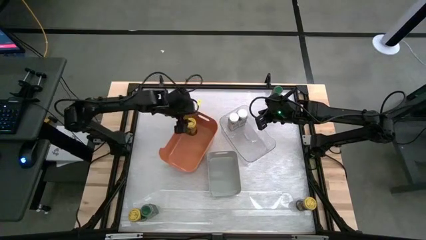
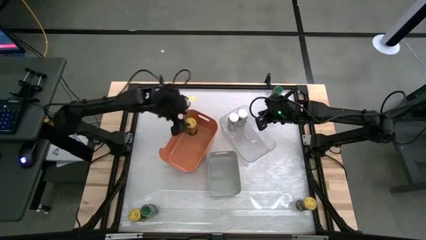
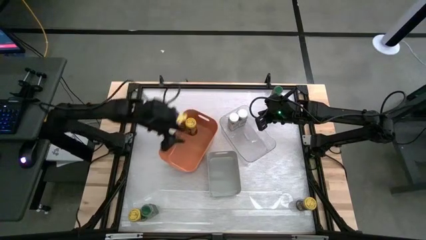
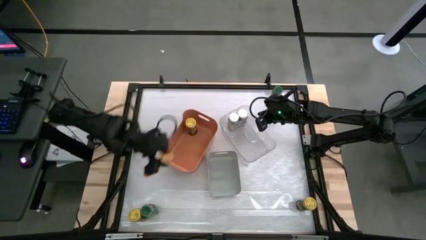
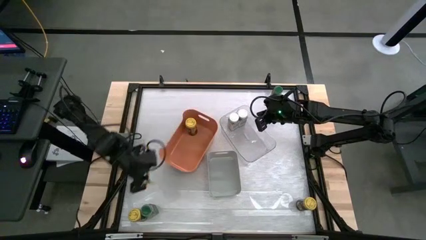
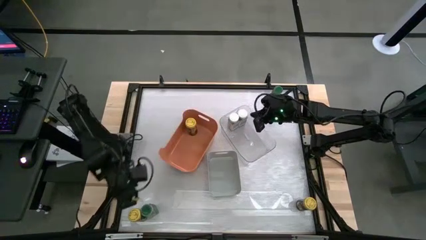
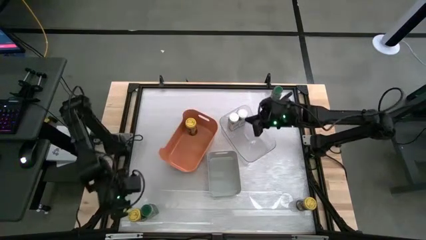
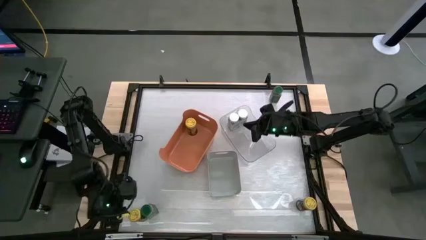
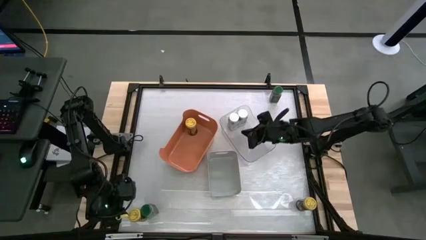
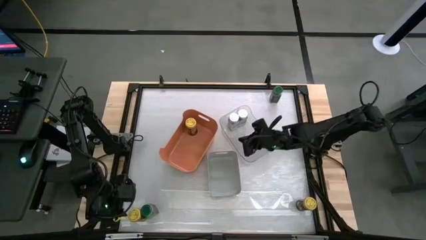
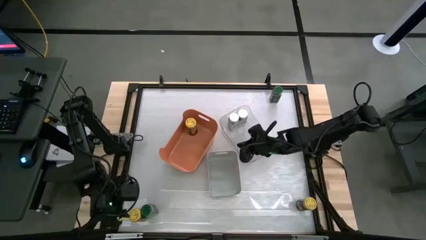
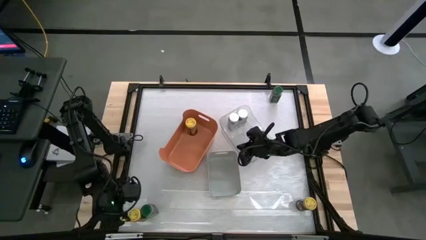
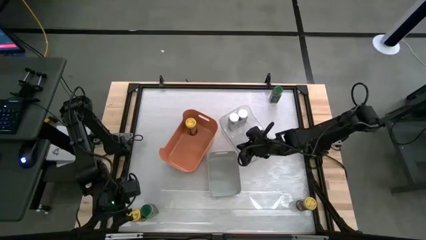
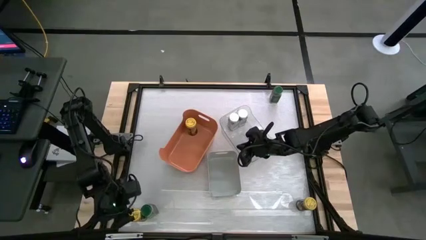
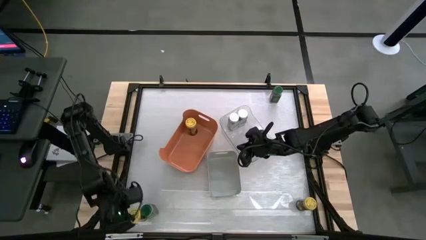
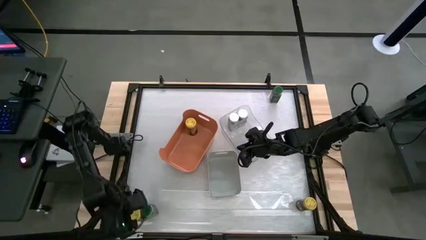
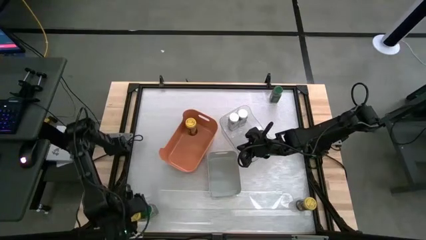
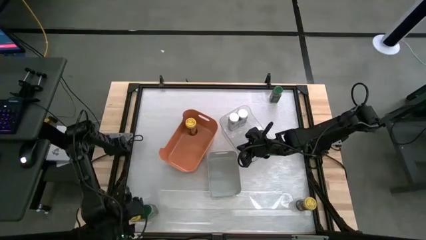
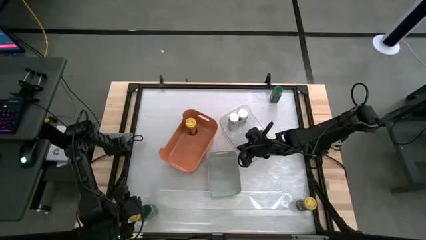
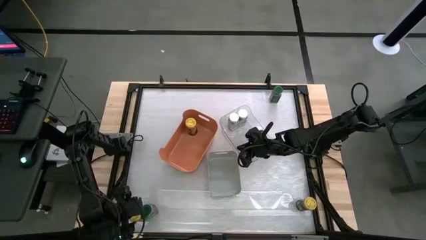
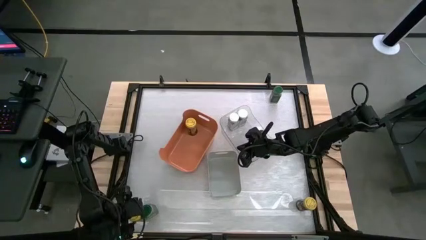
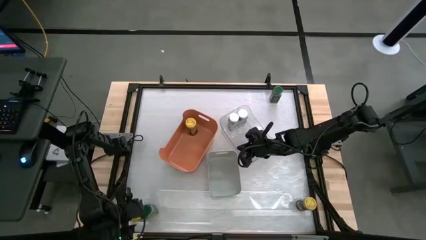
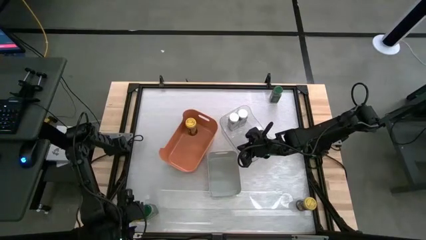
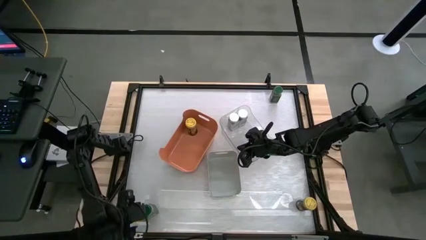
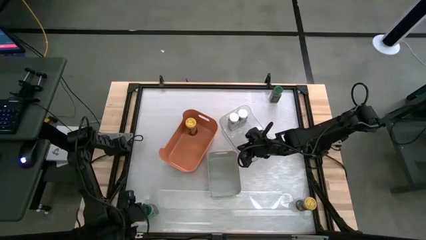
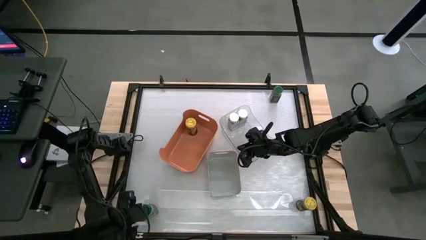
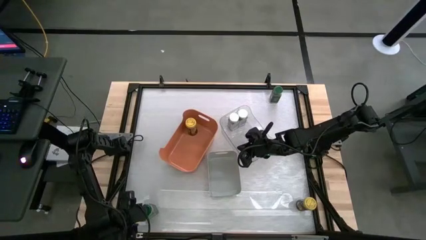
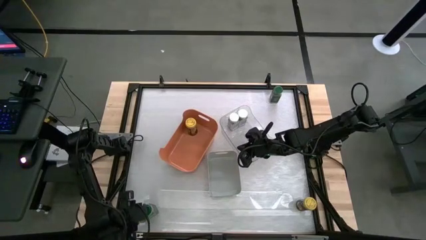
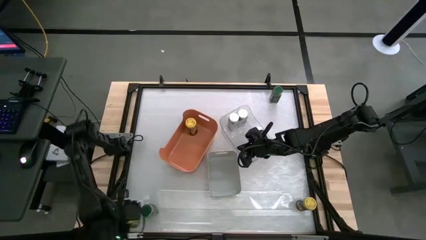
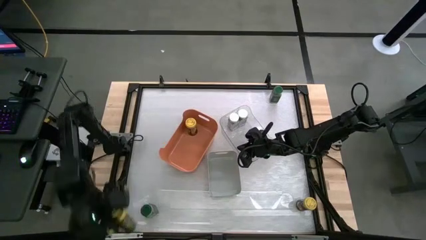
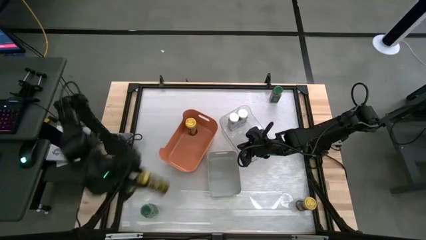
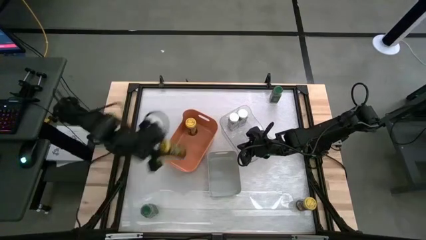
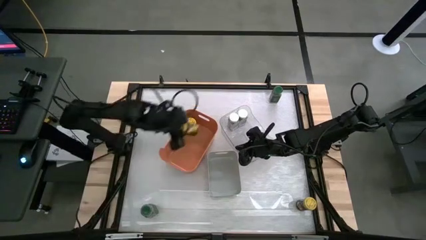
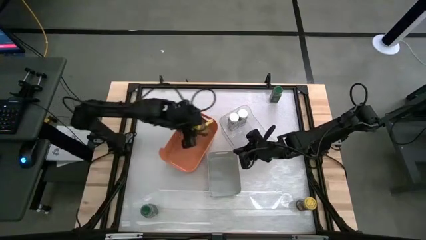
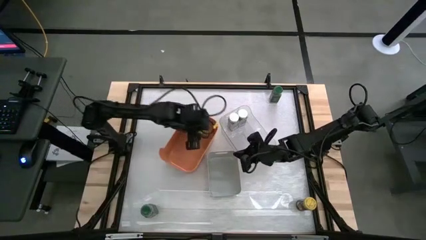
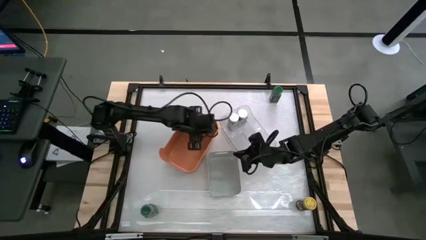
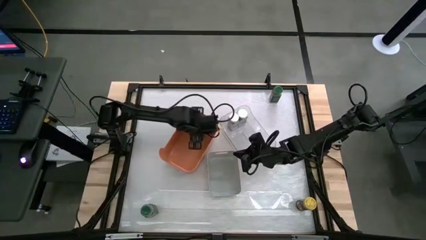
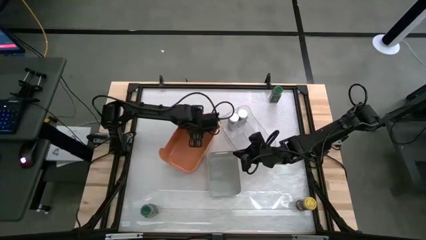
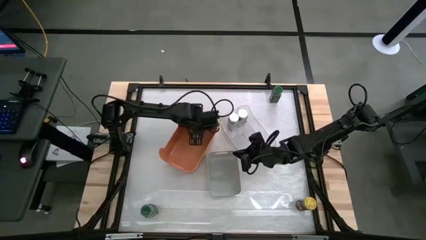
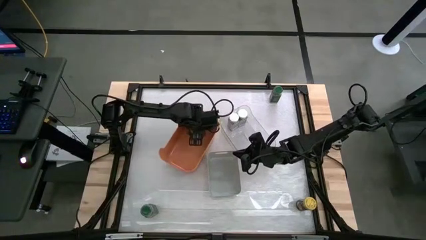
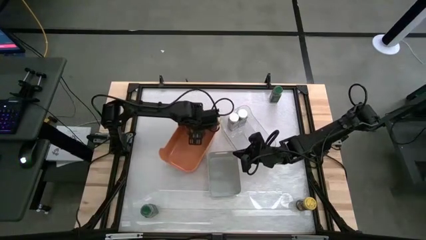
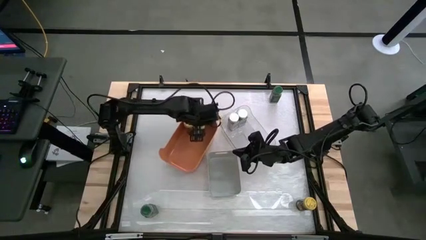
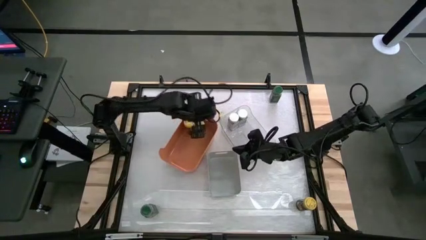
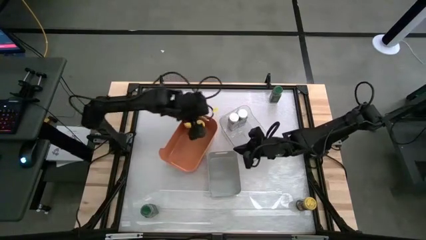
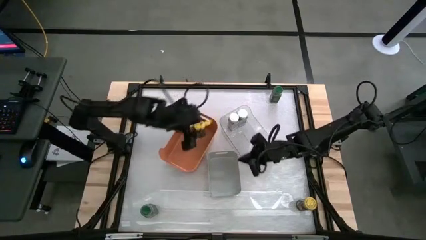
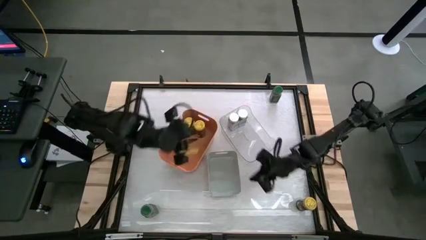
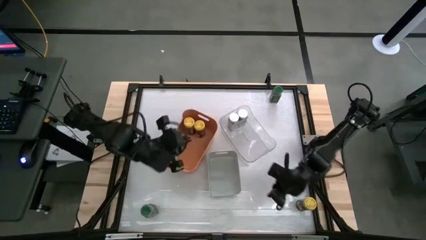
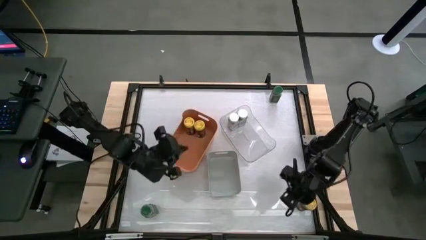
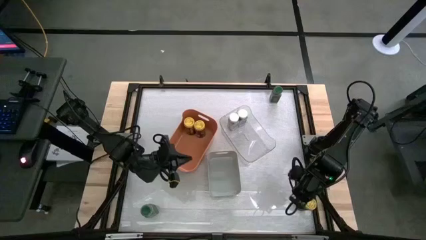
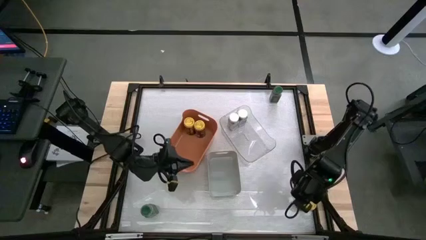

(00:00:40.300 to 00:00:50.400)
Task: Sort spices by type
Put the yellow seasoning bottle into the orange bin
